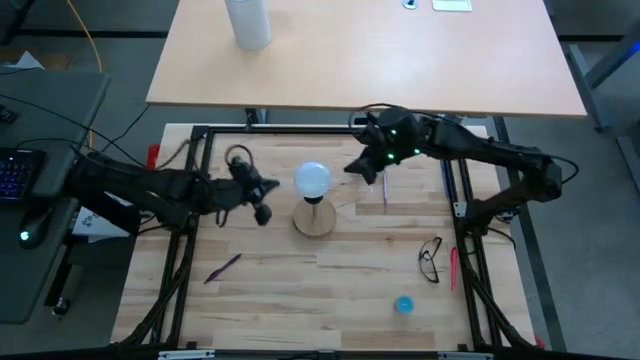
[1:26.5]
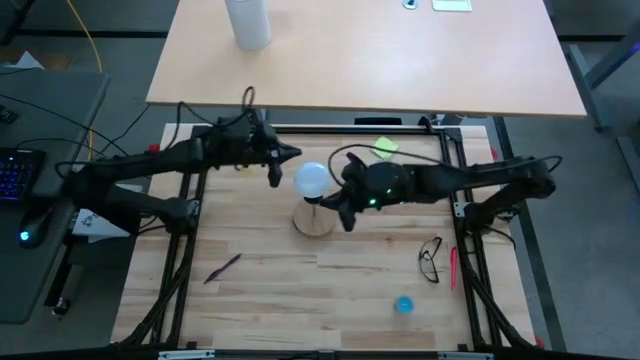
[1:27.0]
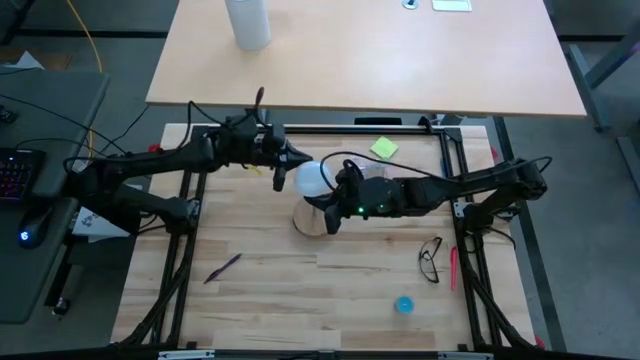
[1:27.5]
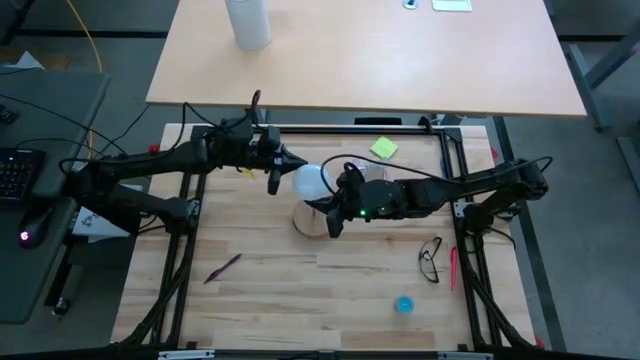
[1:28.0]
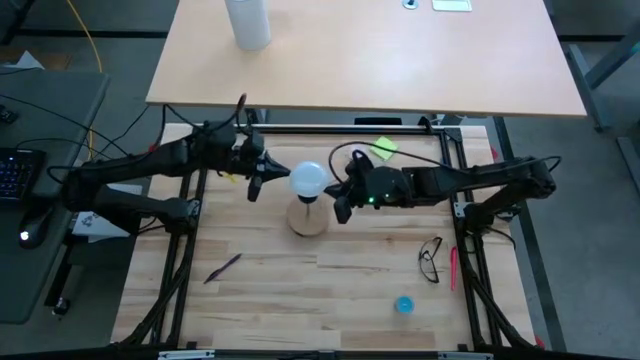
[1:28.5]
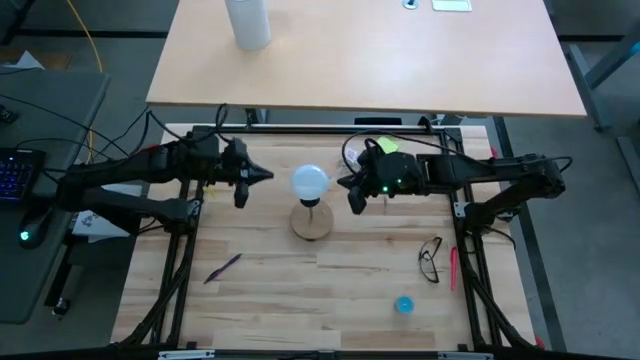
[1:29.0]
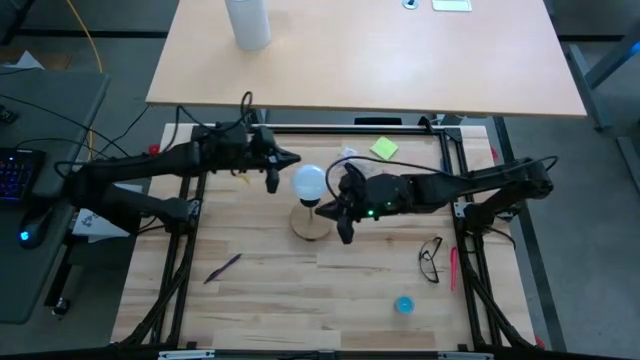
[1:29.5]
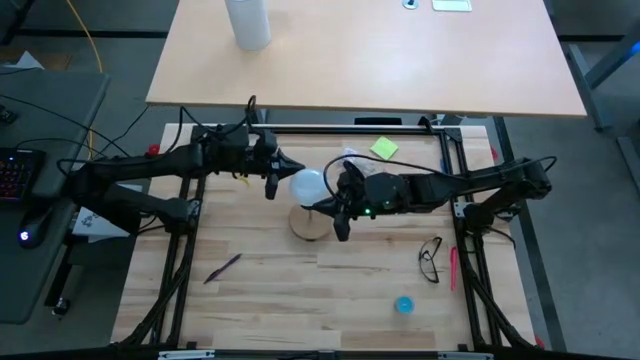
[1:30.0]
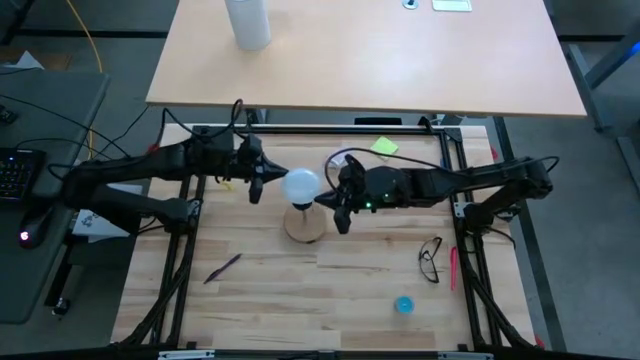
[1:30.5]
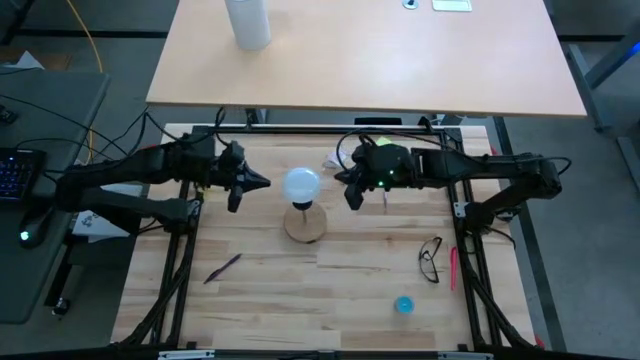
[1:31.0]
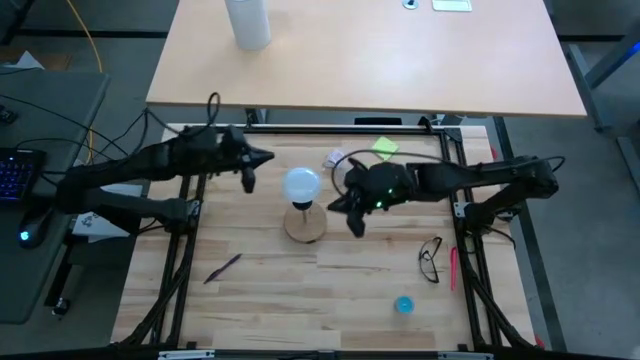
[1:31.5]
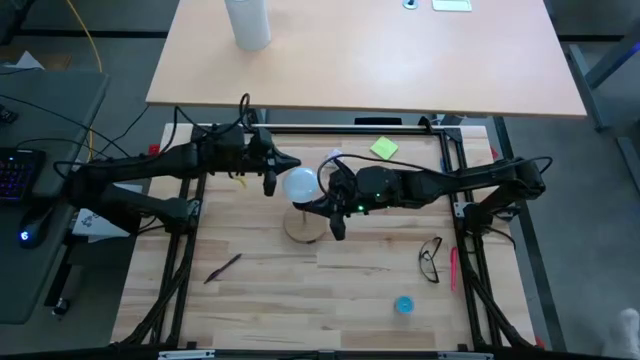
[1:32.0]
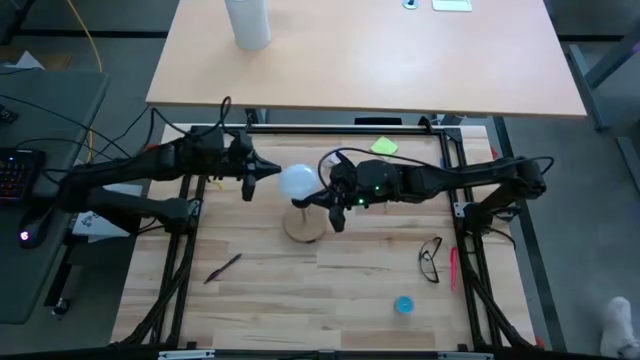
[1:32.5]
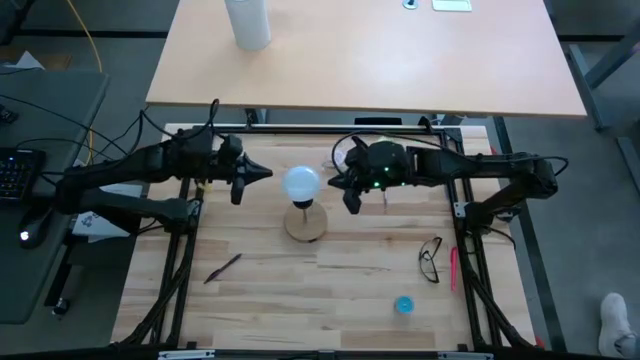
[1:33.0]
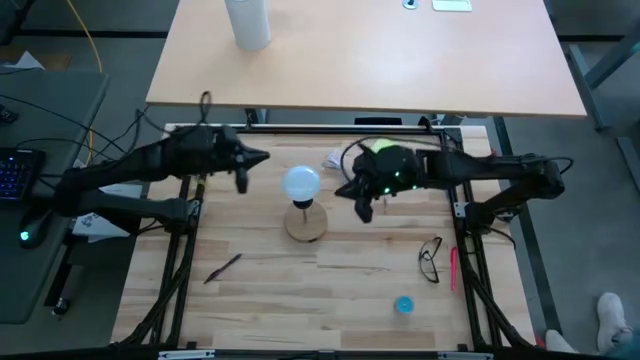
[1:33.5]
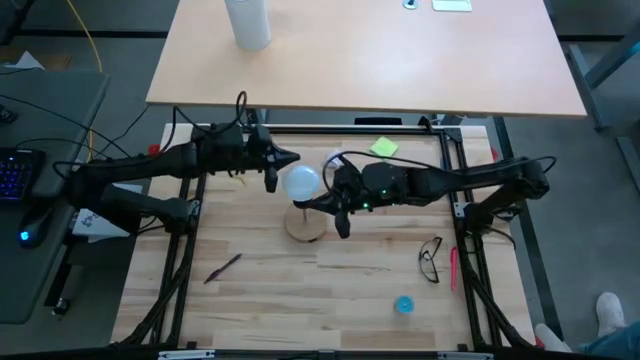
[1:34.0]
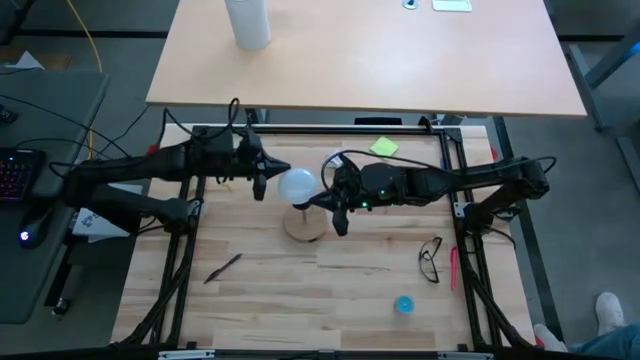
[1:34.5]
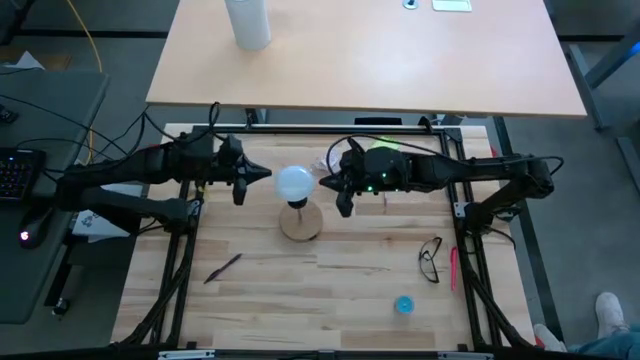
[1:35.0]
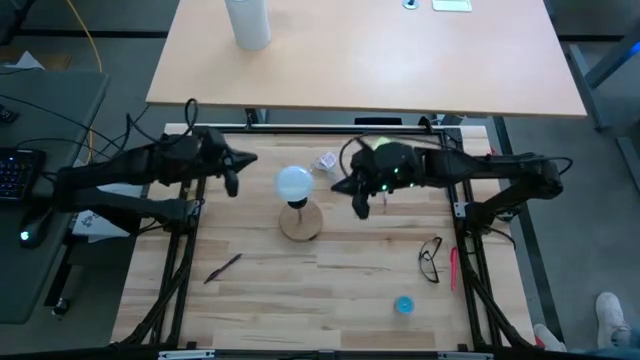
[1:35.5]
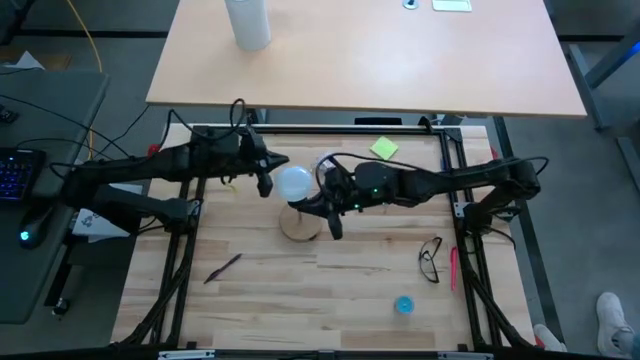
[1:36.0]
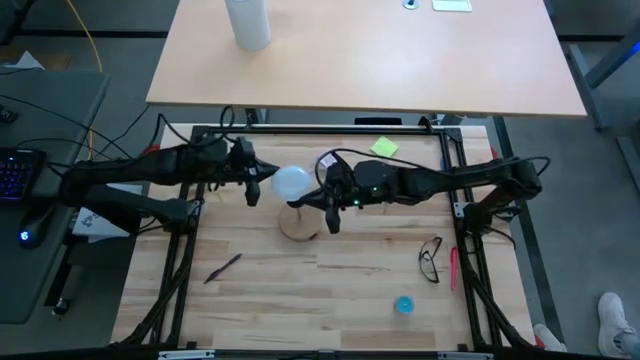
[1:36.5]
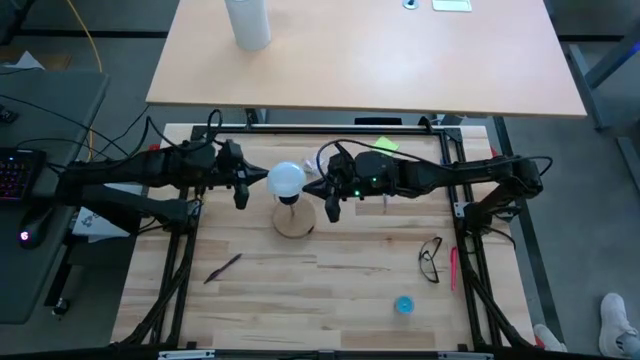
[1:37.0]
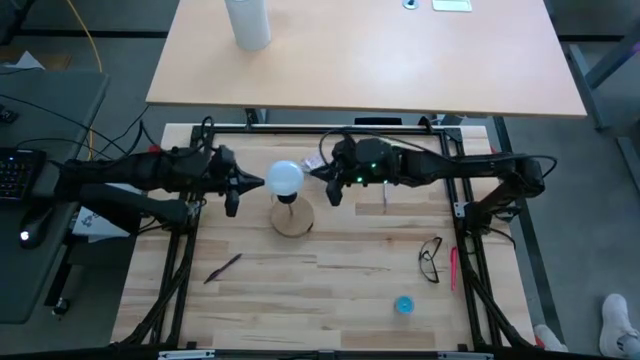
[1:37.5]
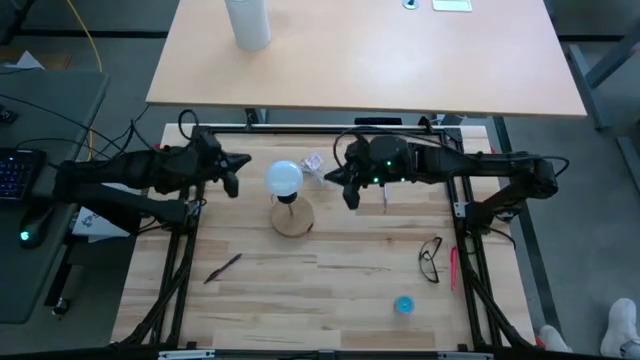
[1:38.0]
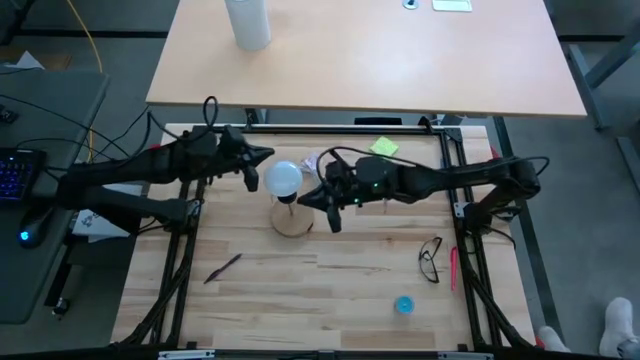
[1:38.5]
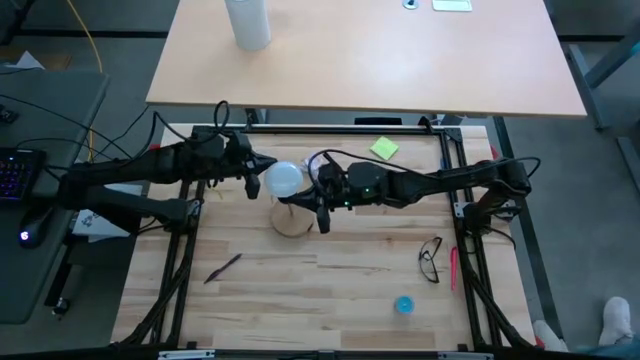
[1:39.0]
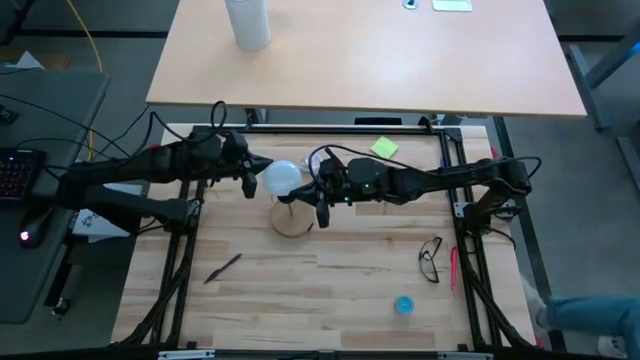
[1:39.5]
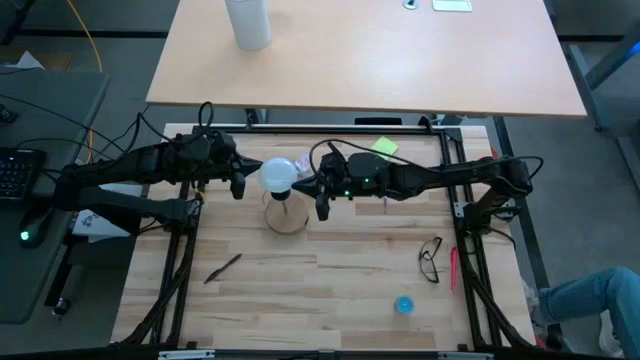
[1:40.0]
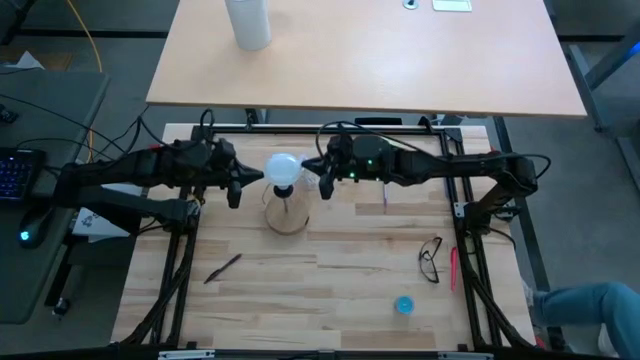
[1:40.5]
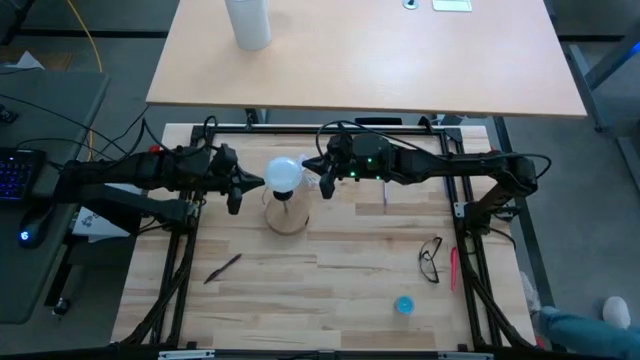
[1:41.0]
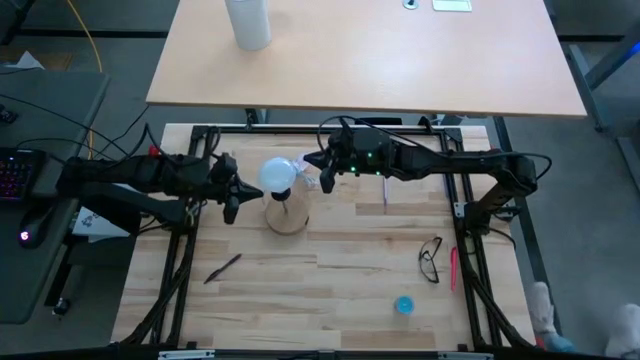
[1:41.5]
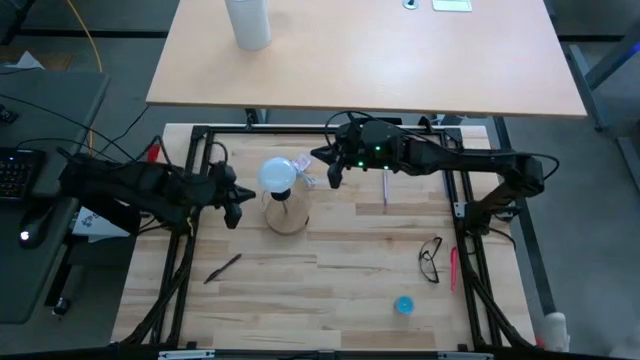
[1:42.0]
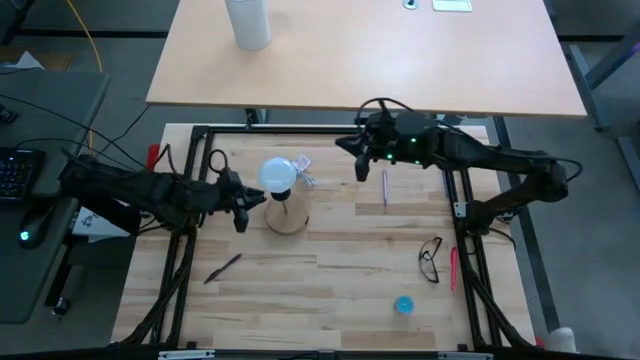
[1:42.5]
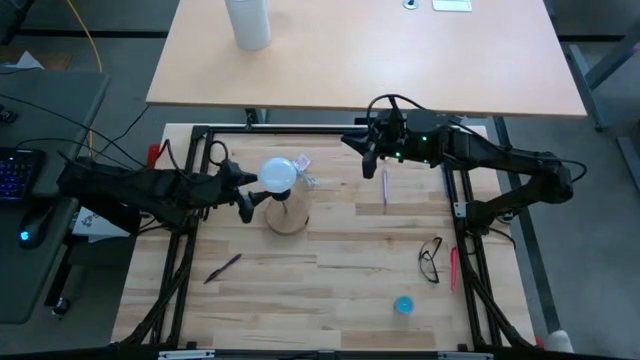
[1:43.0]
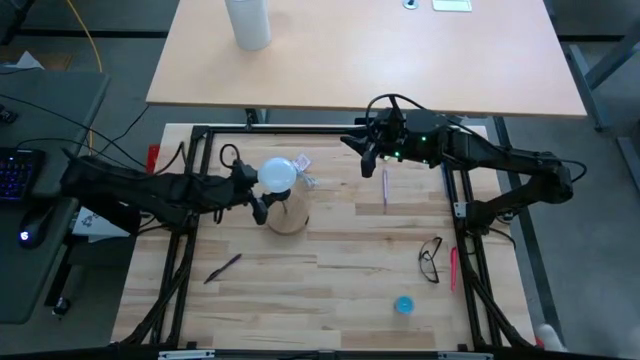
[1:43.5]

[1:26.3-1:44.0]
Task: Screw lightbulb
Remove the lightbulb from the lamp

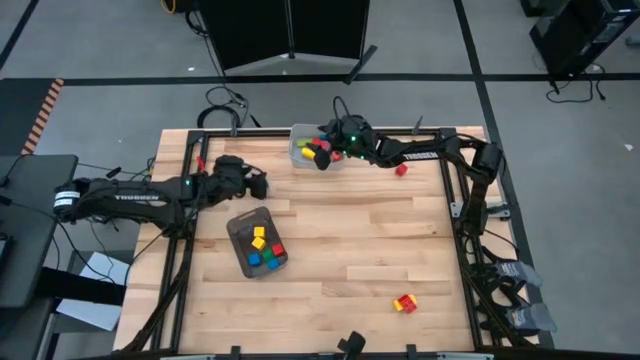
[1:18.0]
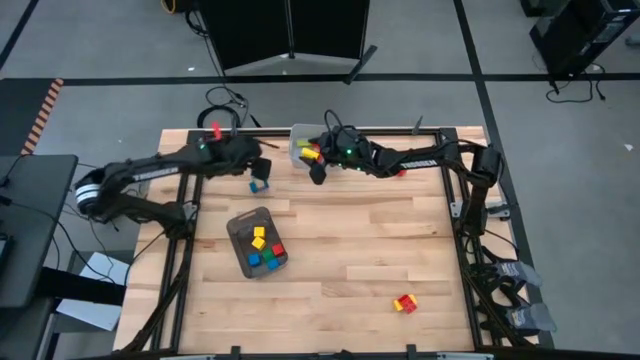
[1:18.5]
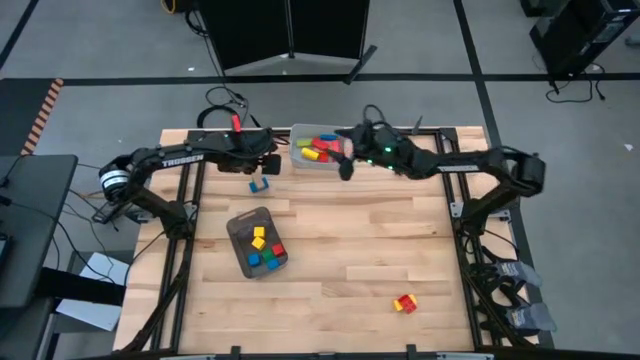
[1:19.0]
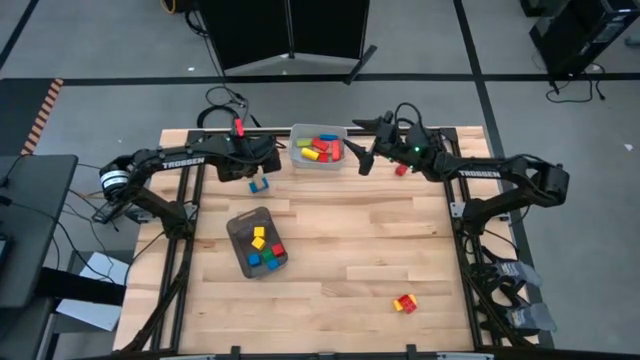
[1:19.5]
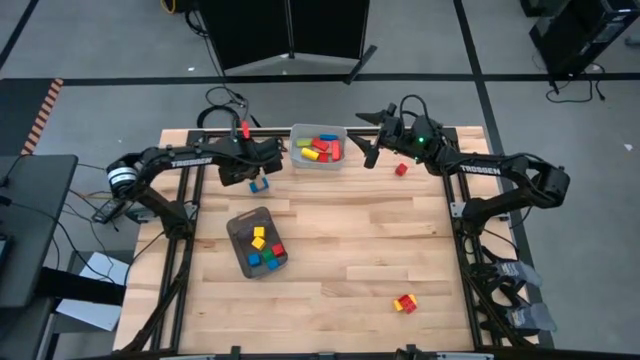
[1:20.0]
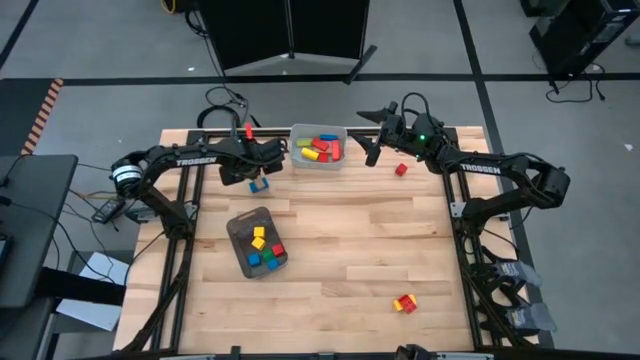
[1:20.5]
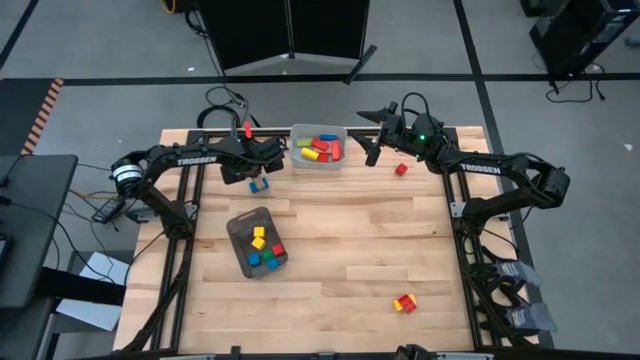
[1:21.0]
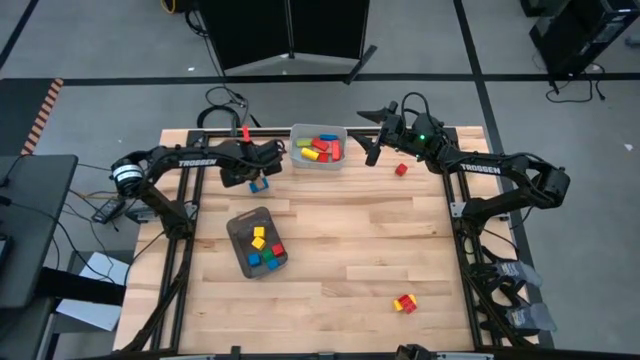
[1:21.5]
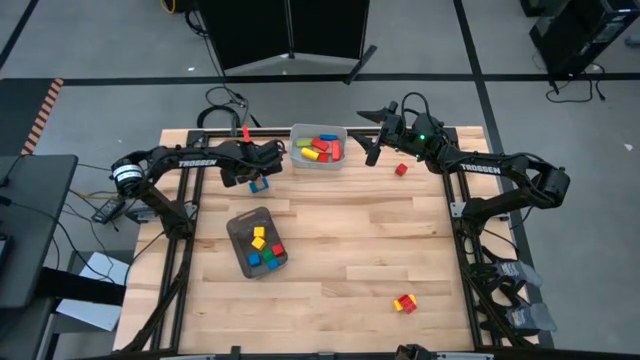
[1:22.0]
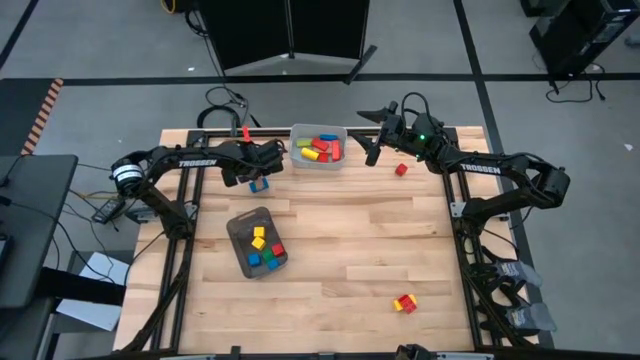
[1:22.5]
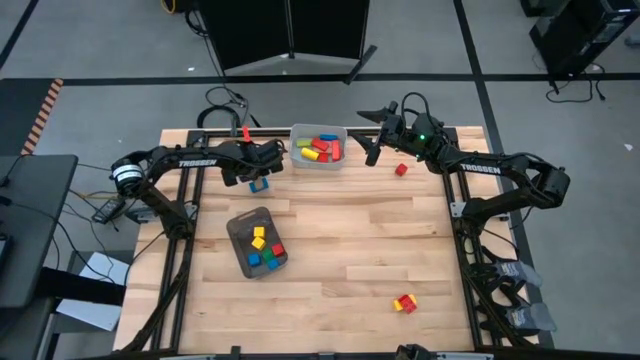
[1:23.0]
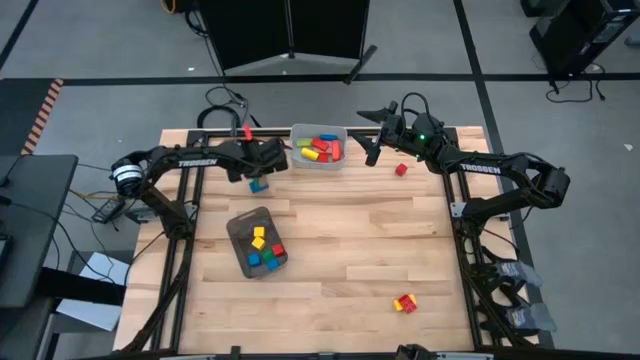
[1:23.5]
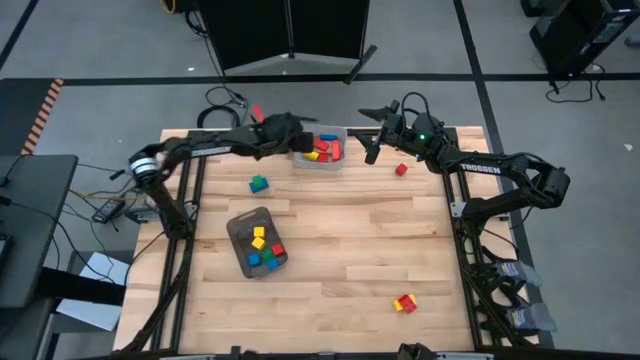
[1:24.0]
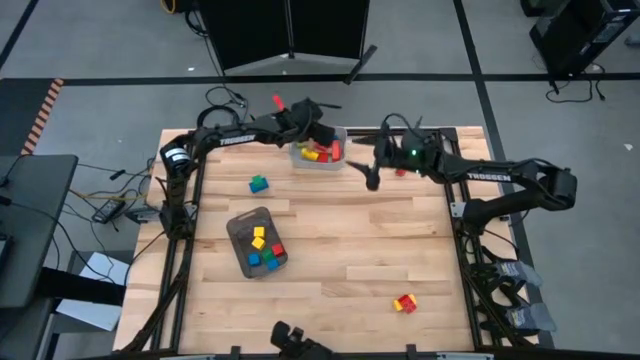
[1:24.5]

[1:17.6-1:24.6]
Task: Sort blocks by size
Put the brown rectangular block into the gray bin
